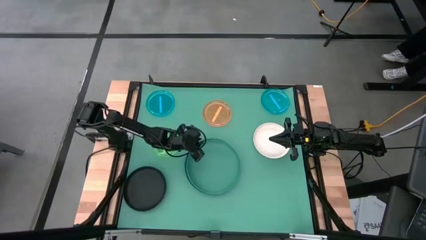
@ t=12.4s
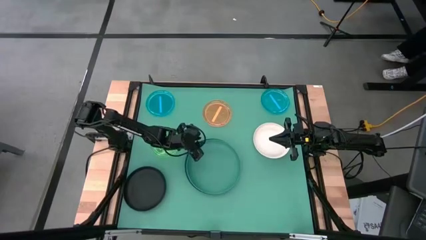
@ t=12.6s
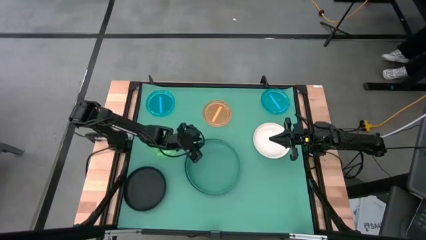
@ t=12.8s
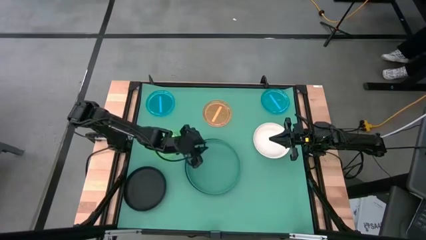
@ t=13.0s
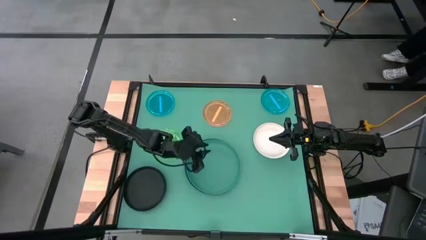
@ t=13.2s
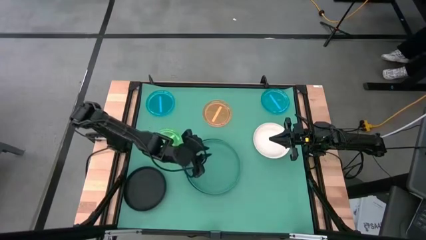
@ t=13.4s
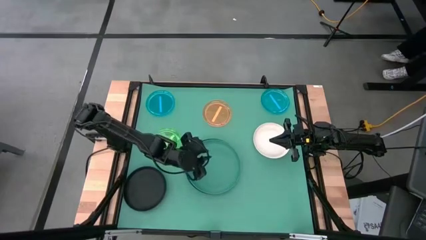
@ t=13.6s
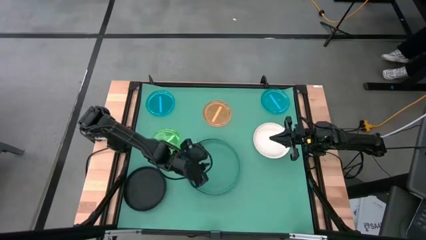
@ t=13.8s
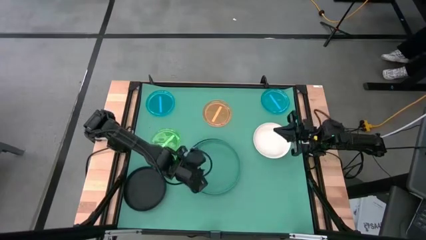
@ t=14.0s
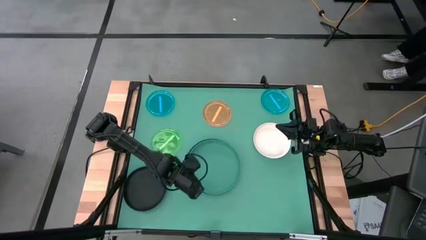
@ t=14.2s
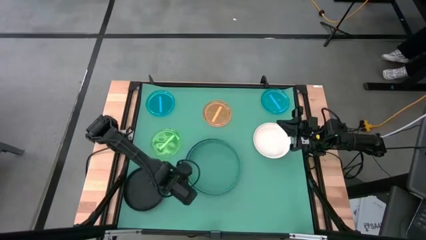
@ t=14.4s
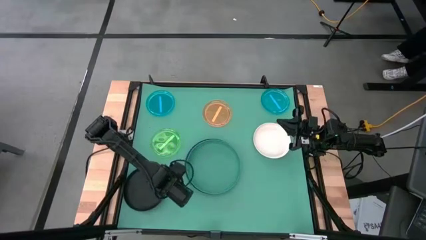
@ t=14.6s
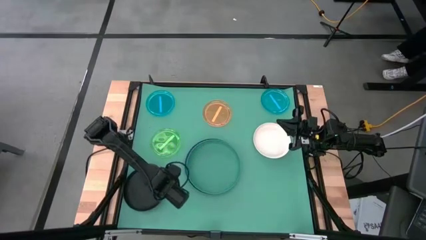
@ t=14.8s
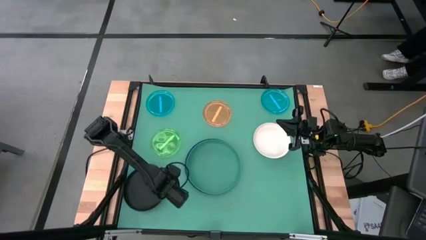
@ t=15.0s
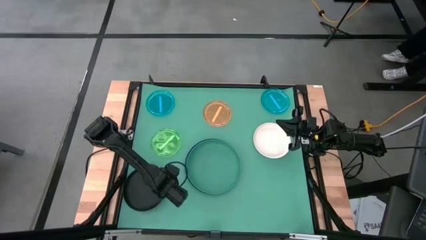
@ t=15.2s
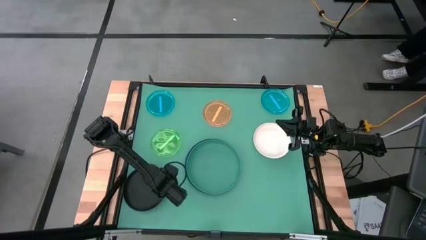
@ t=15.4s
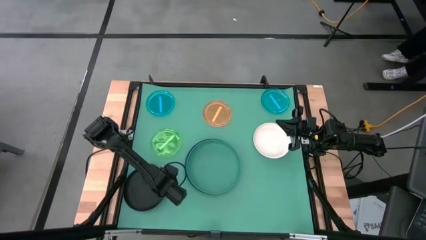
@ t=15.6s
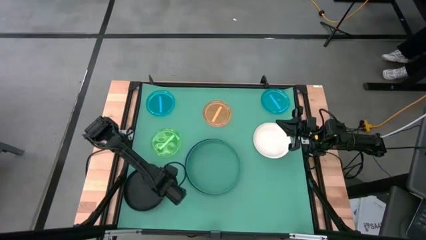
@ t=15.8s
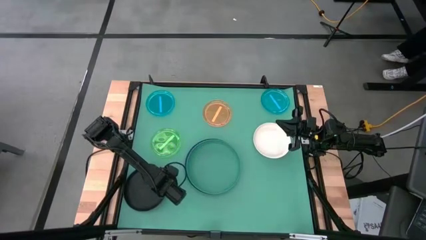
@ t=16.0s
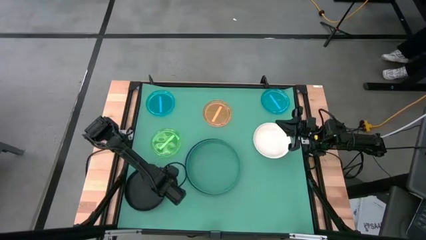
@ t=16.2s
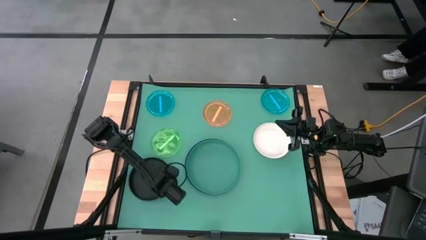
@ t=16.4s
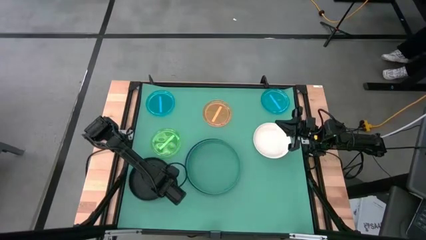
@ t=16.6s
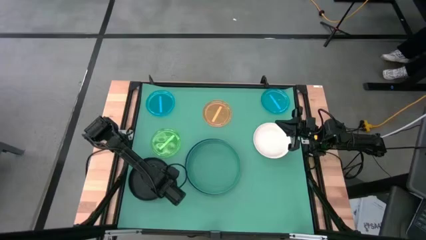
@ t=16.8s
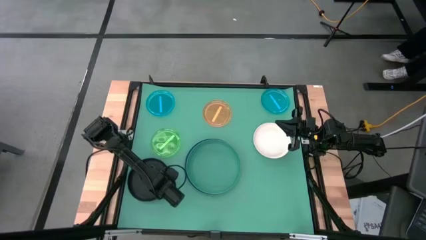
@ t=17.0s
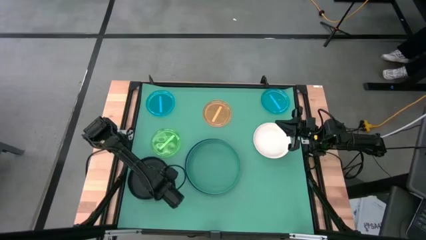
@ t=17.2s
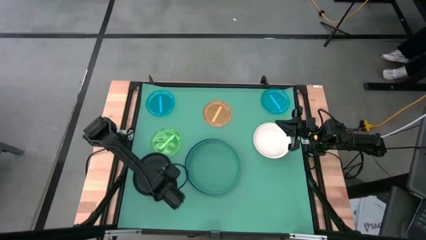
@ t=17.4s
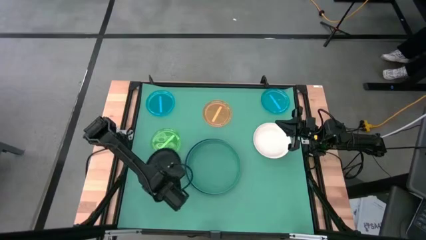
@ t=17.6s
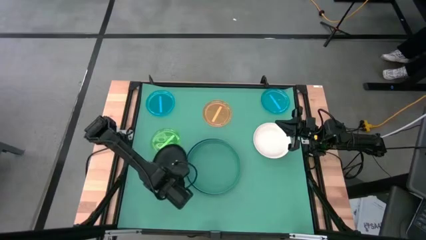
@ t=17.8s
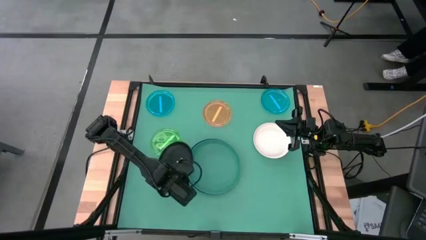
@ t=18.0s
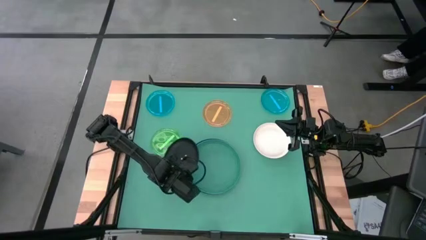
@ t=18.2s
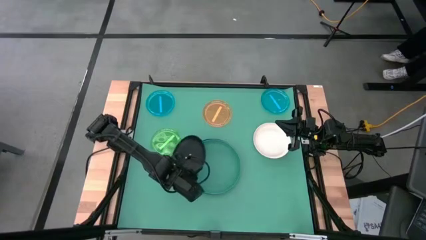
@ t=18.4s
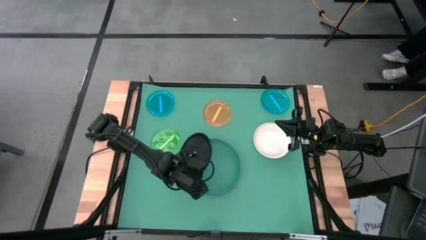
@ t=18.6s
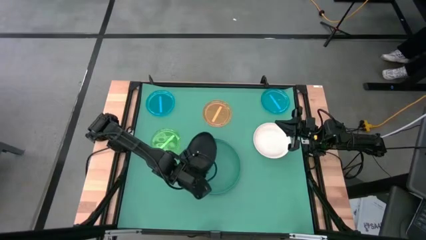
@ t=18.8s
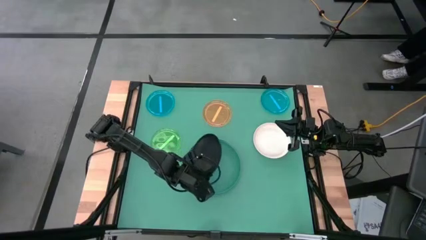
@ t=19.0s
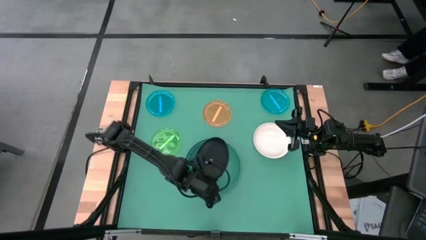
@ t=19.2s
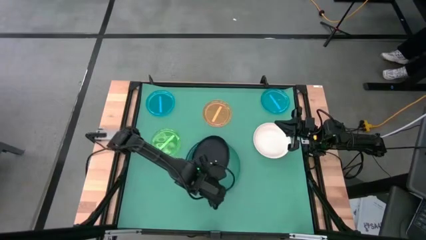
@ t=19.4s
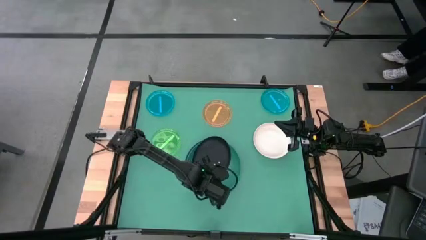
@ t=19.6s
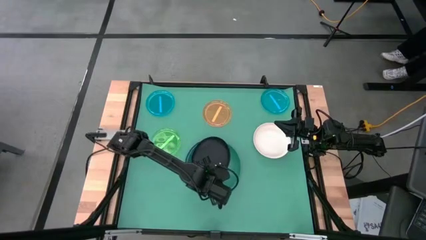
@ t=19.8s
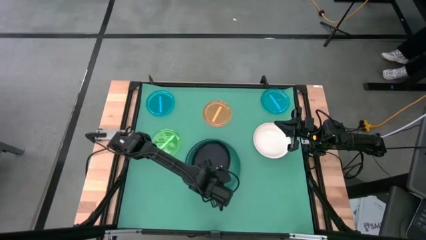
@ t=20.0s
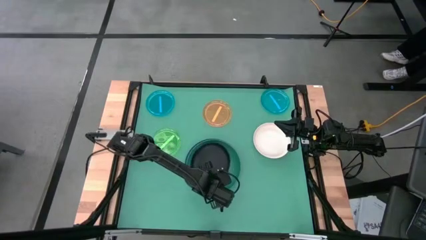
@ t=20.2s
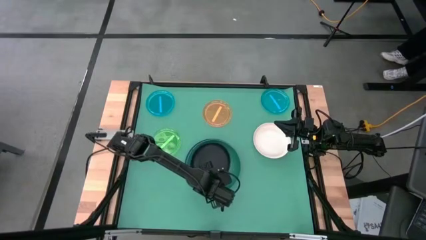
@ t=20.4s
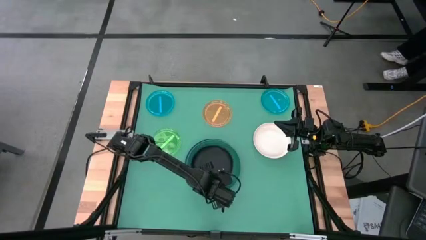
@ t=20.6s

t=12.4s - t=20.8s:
Task: Stack plastic plates
Stack the black plate on top of the green plate

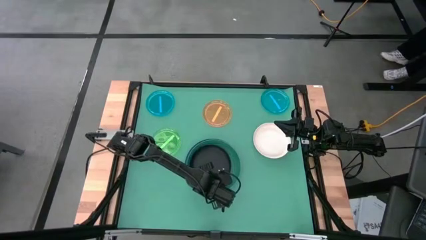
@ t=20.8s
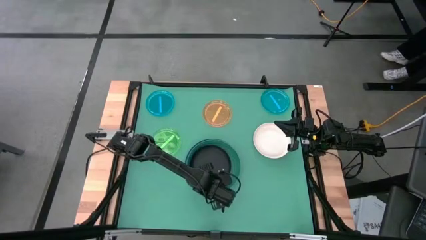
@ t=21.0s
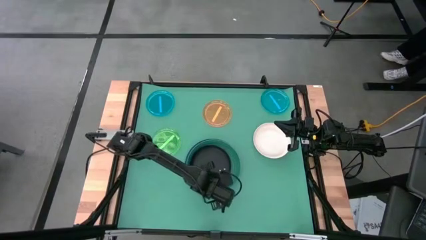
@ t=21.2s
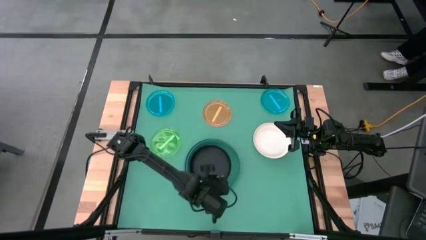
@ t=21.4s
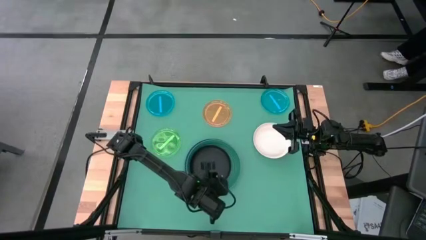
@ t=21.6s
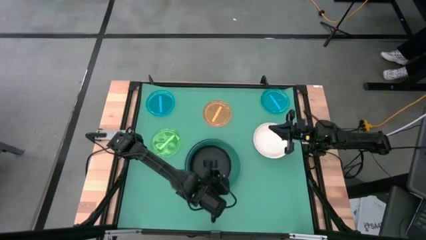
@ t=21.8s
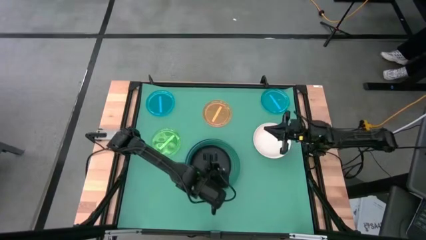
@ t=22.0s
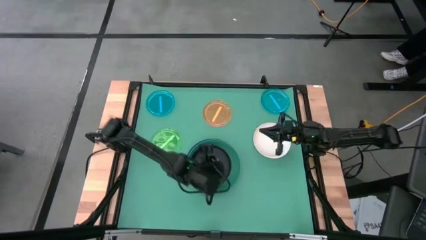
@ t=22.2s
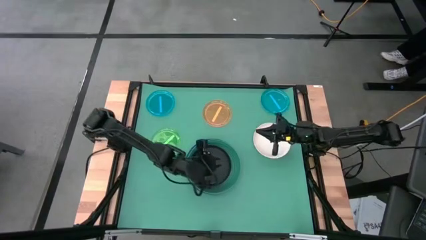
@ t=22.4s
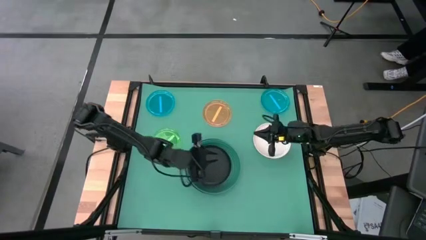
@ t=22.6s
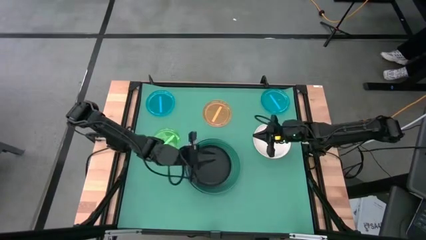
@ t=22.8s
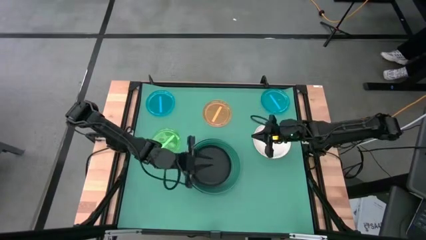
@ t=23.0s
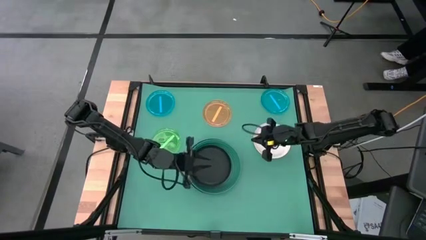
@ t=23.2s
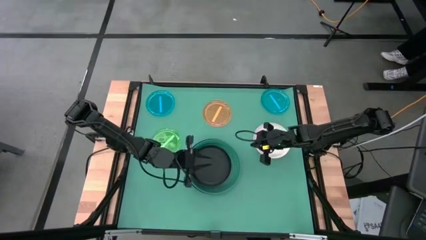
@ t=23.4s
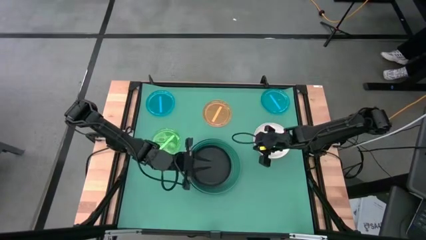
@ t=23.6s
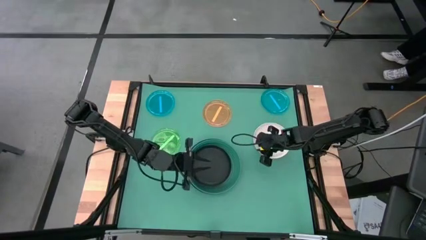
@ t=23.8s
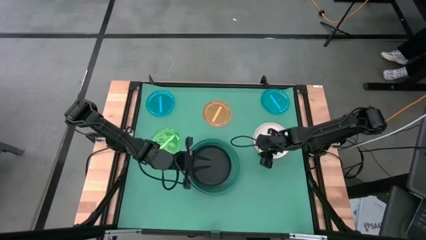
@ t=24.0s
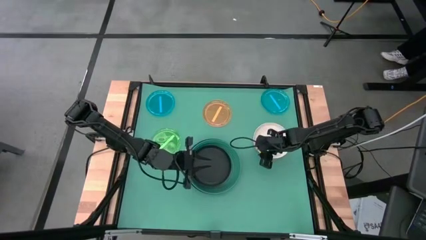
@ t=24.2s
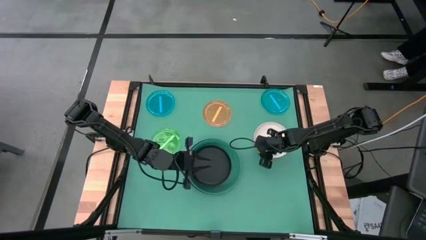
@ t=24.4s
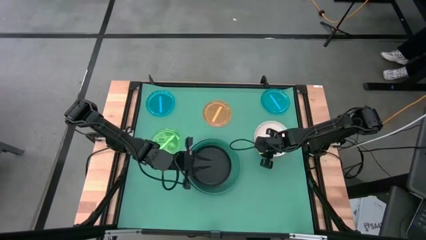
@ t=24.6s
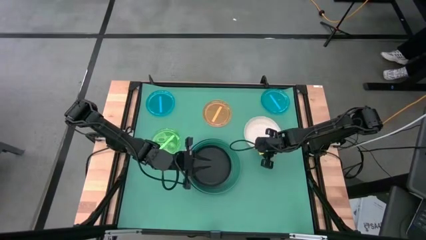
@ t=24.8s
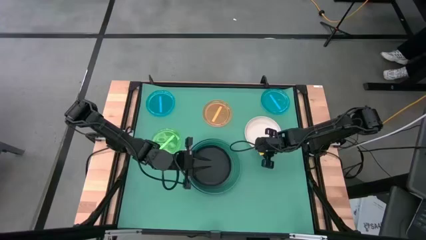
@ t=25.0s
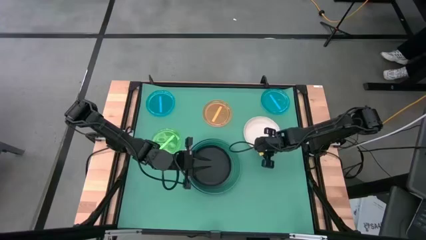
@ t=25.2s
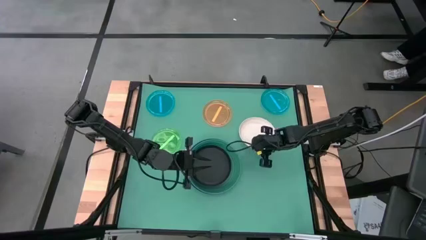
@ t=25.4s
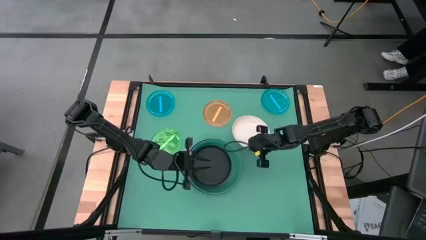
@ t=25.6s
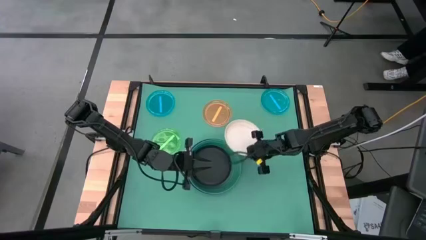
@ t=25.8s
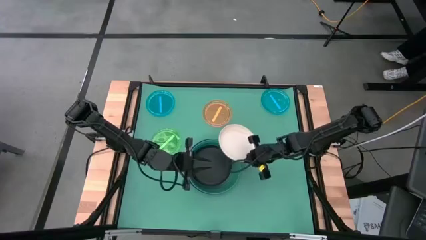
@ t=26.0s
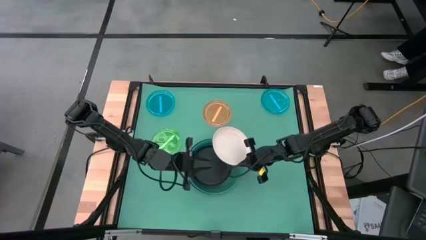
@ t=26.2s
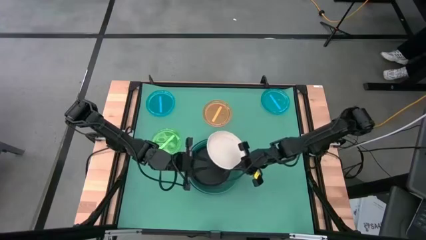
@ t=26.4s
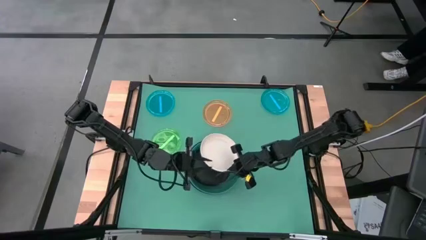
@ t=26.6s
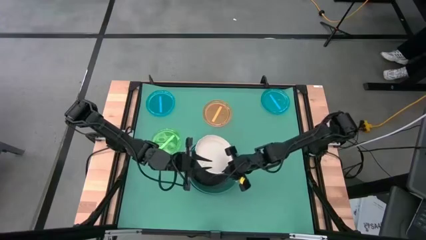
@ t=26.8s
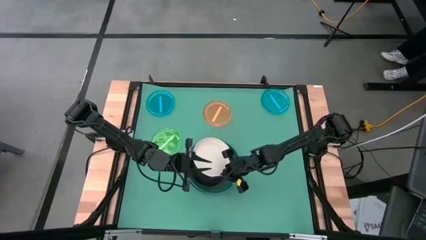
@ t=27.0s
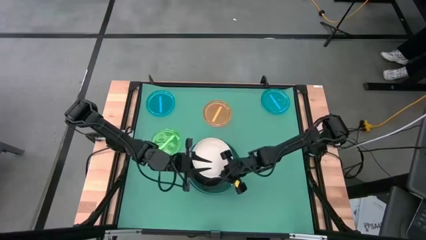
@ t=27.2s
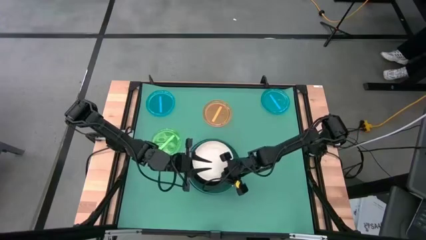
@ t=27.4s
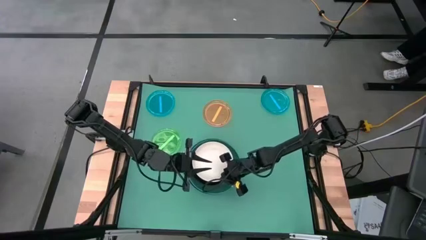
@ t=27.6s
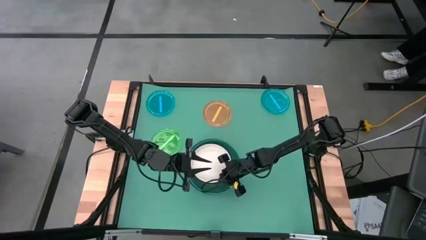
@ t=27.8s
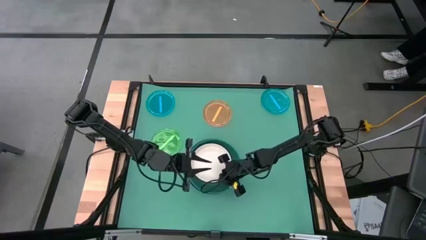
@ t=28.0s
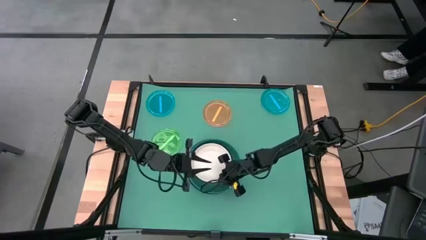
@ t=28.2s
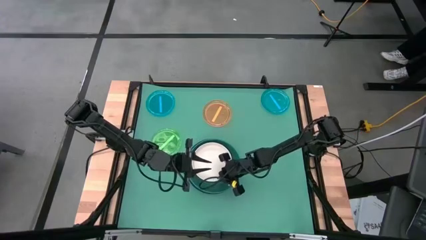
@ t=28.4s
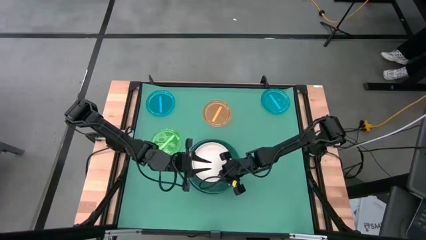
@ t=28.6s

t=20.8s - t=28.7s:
Stack the white plate on top of the black plate
